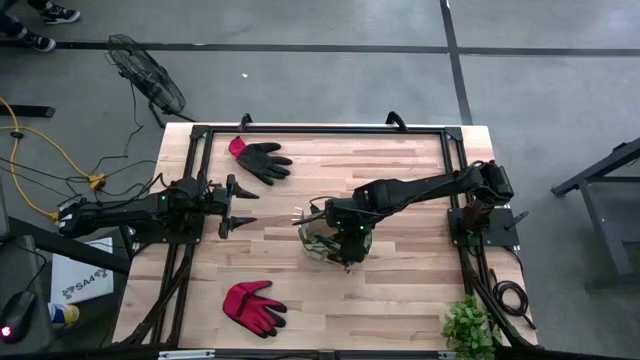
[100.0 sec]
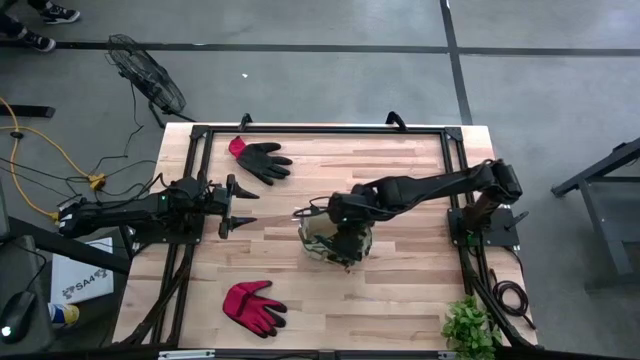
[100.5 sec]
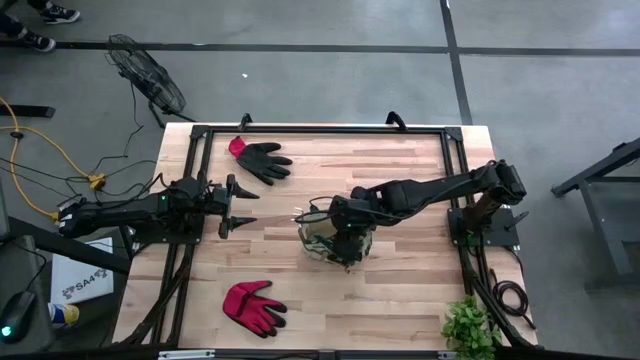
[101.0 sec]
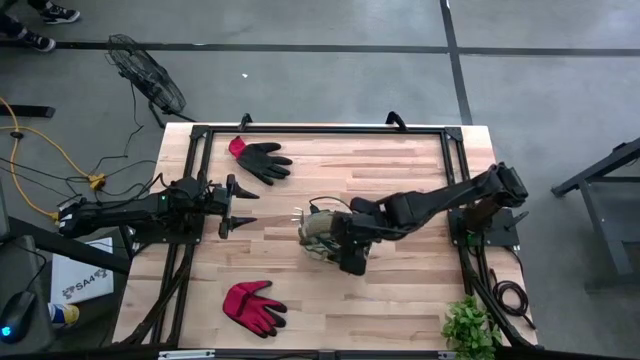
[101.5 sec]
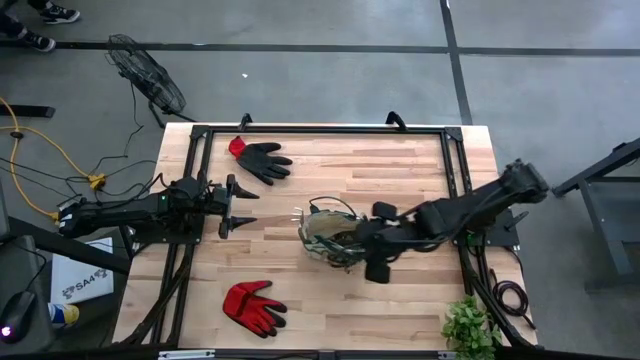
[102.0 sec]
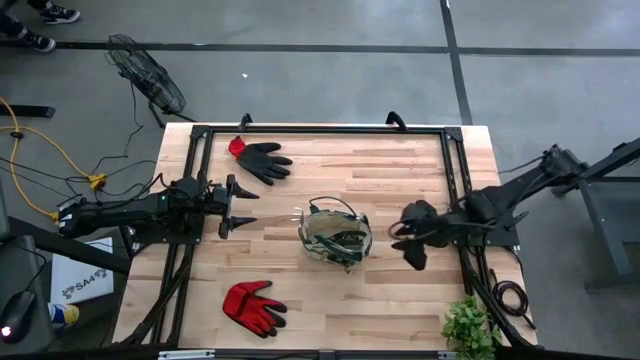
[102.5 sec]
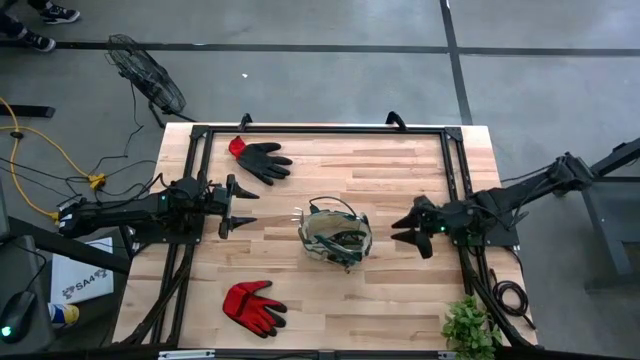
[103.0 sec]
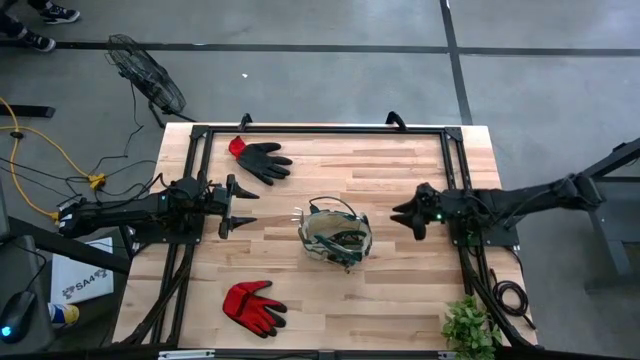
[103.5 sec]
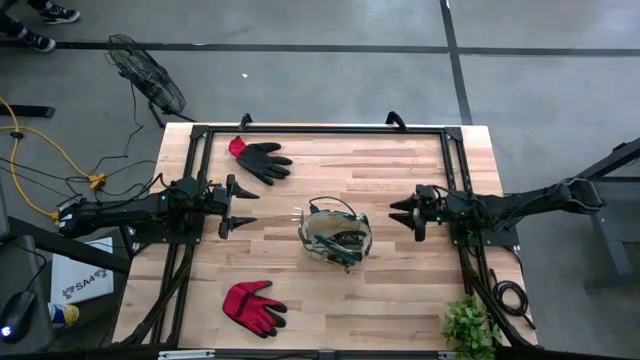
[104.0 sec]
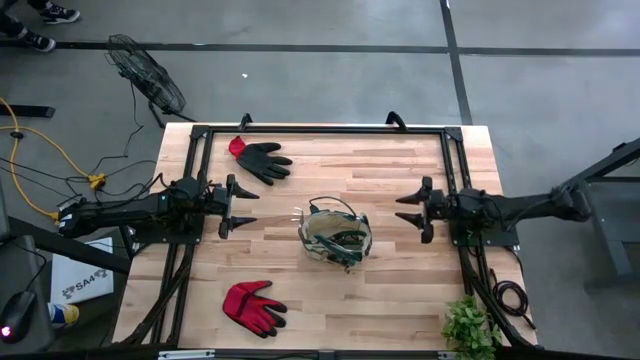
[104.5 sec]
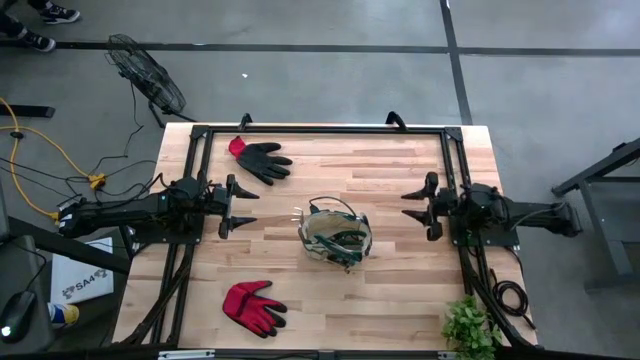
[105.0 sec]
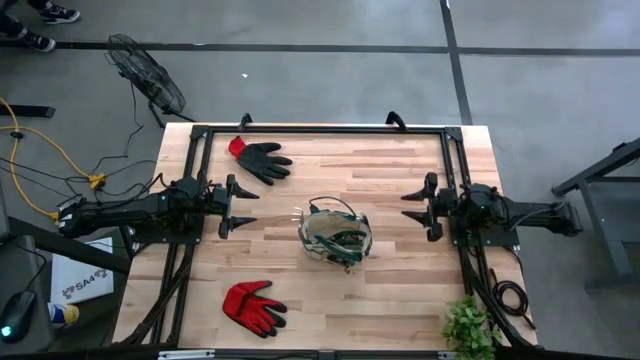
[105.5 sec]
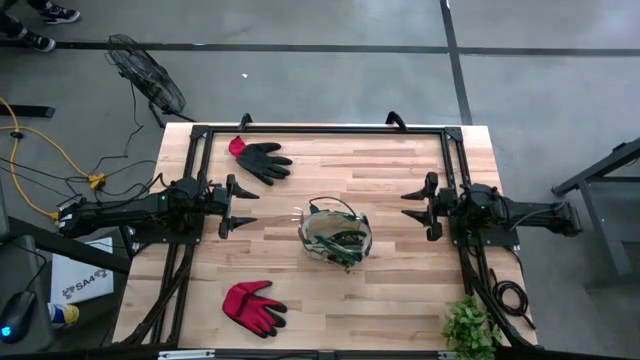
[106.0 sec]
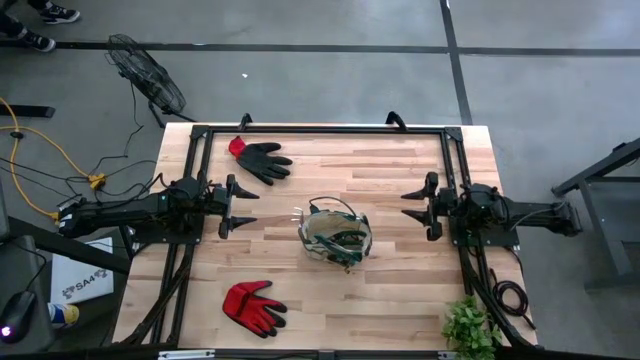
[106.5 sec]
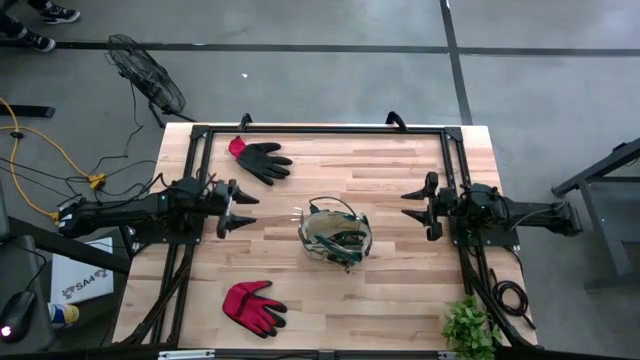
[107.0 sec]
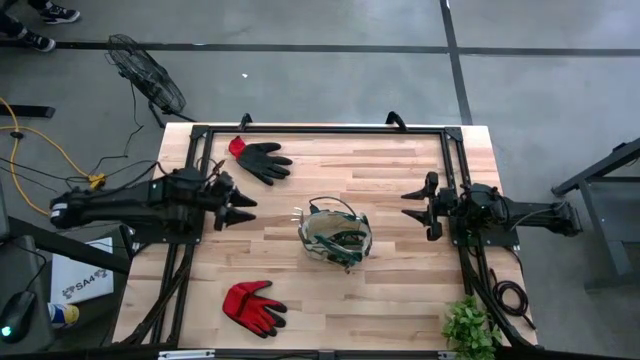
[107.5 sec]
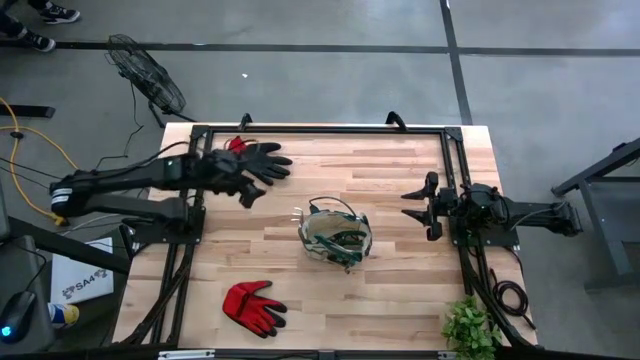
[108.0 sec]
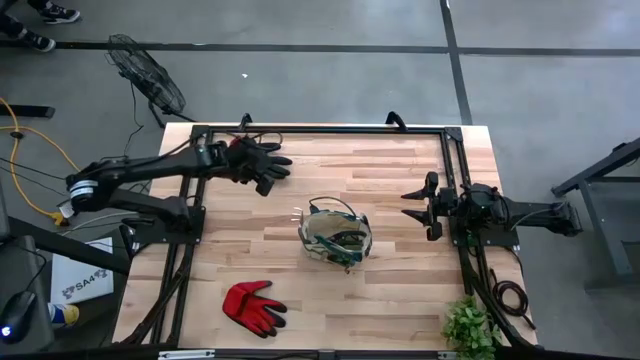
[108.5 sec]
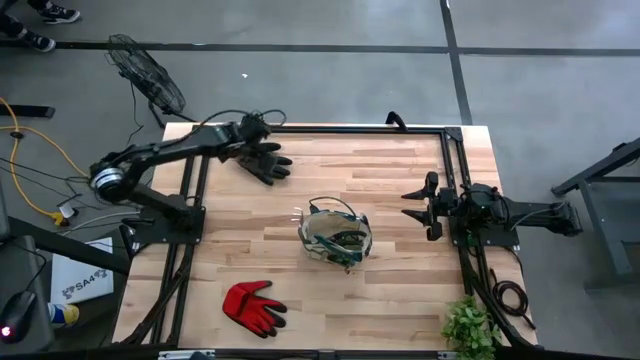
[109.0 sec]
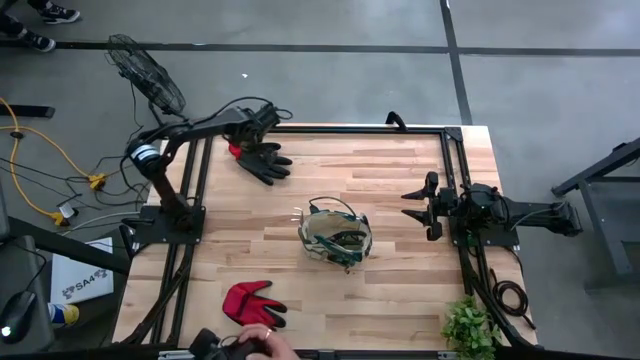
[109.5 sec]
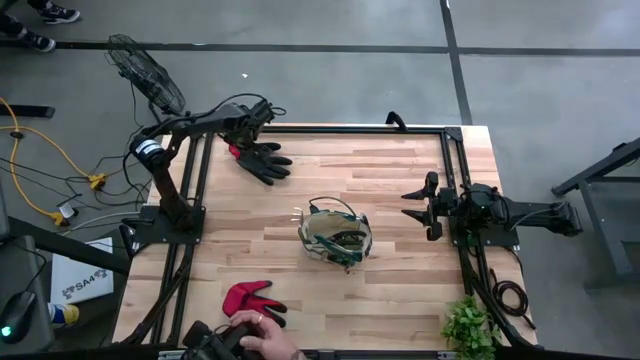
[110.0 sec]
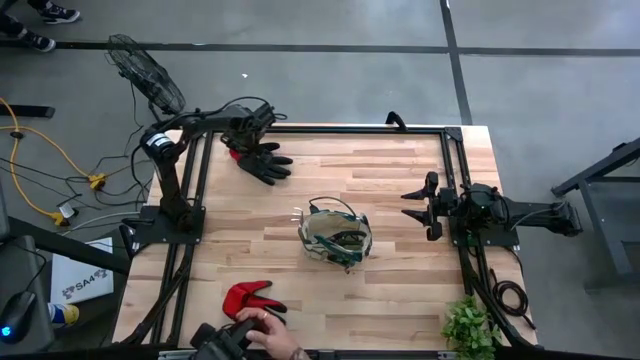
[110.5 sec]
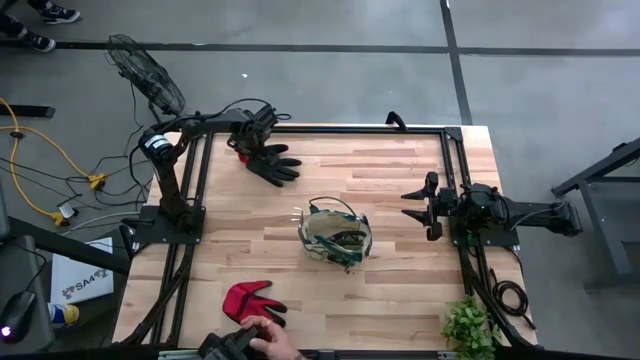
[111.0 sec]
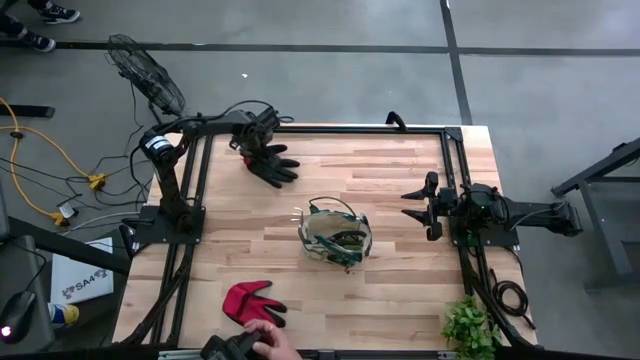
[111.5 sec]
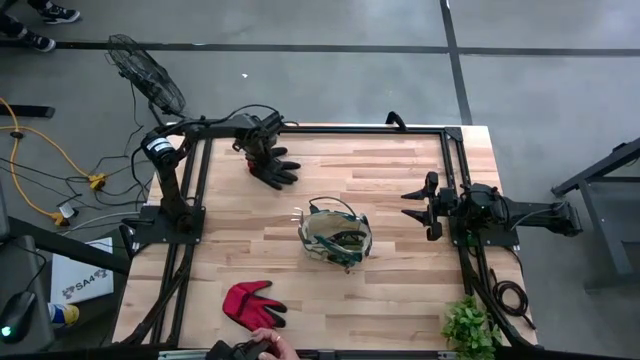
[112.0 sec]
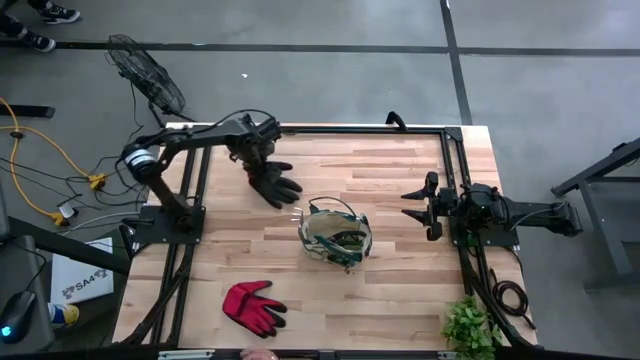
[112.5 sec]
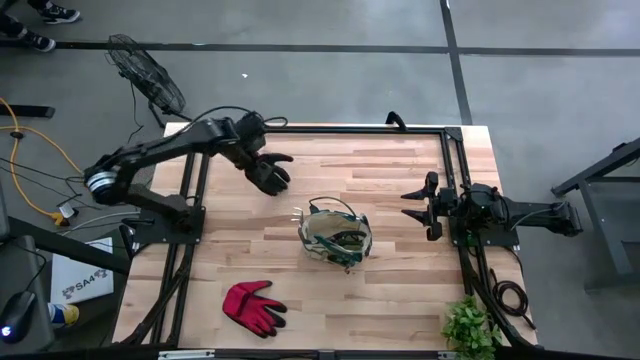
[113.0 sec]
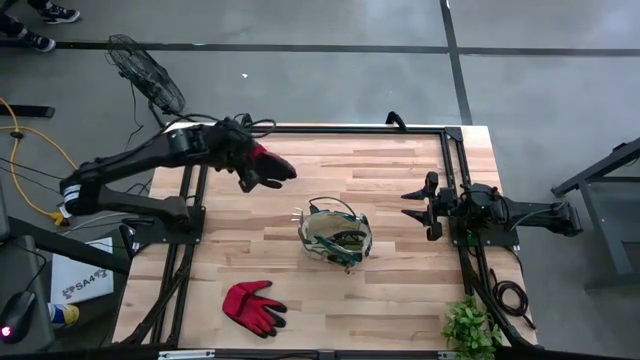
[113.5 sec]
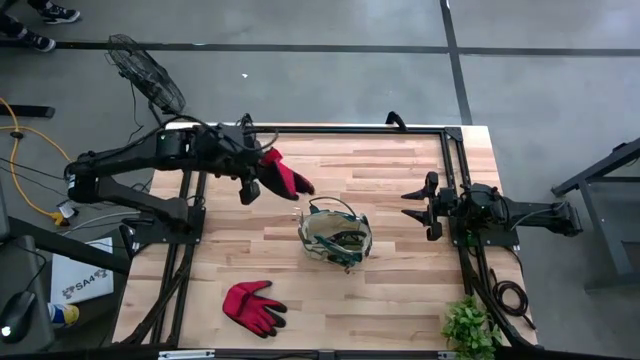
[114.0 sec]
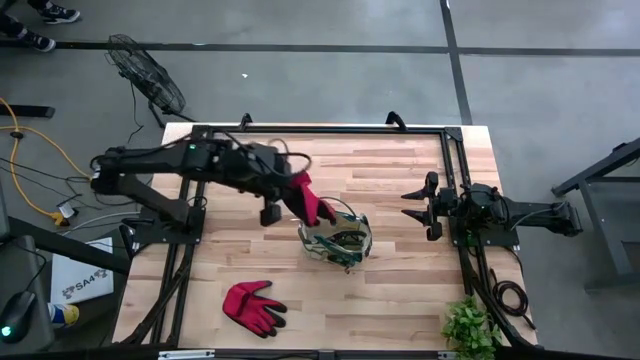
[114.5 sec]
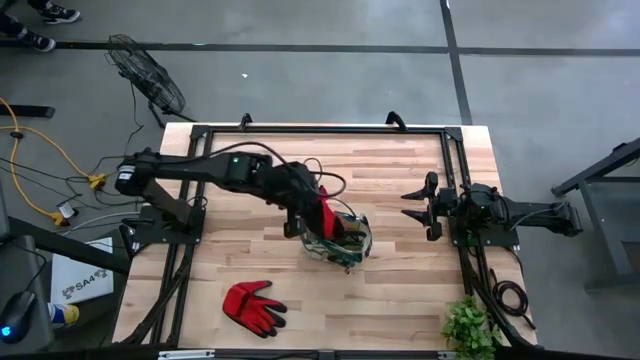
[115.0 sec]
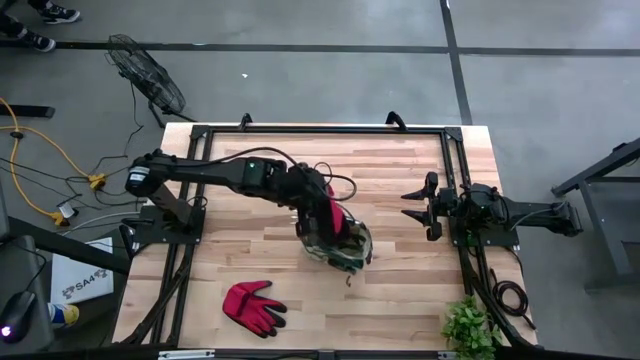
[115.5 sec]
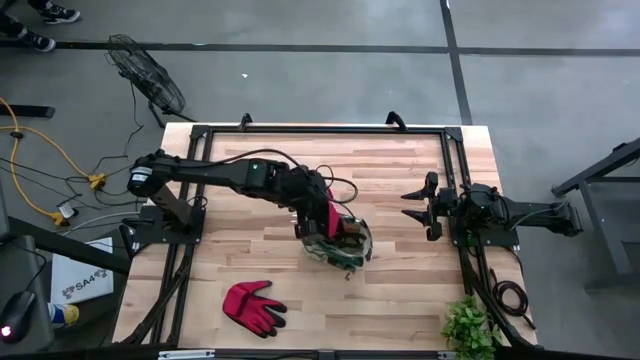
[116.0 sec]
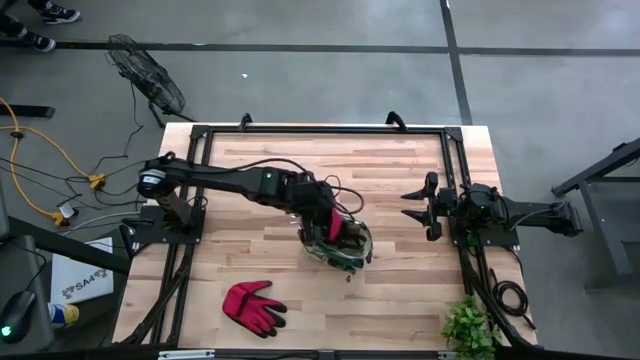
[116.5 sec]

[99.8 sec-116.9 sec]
Task: Pick & Place Garden tools in Gardening bag
Put the red glove into the gardening bag

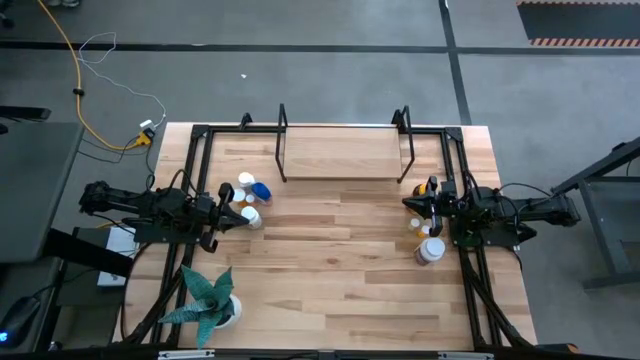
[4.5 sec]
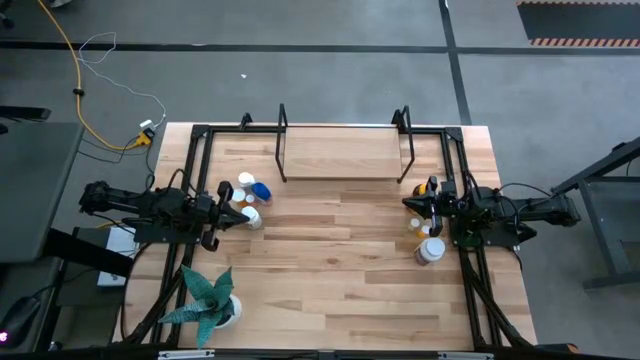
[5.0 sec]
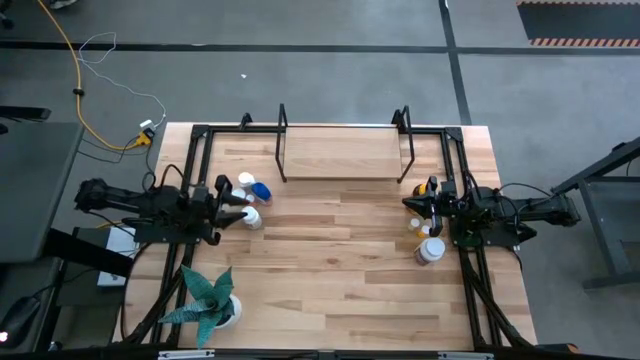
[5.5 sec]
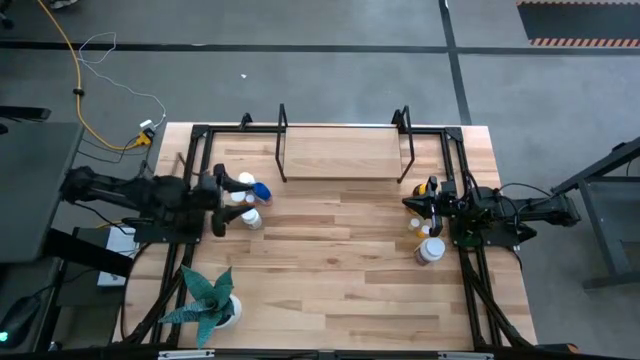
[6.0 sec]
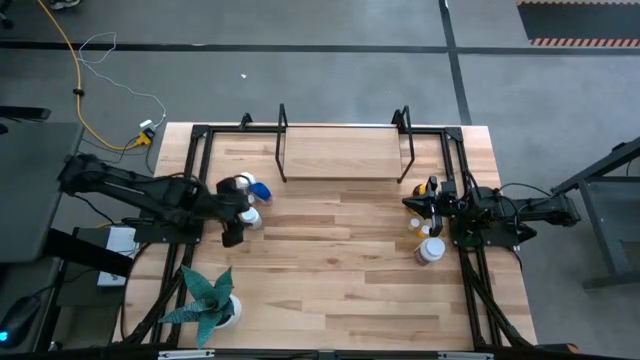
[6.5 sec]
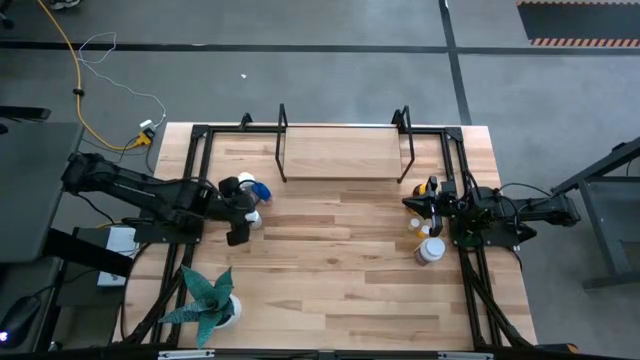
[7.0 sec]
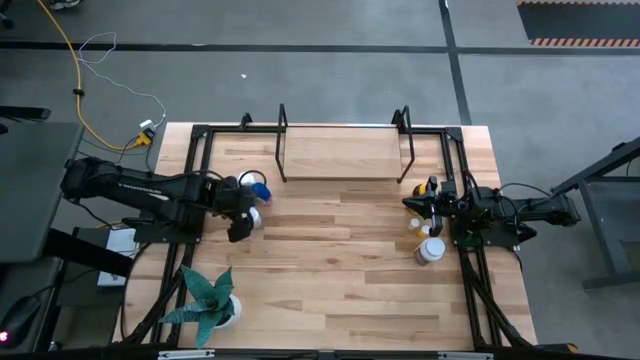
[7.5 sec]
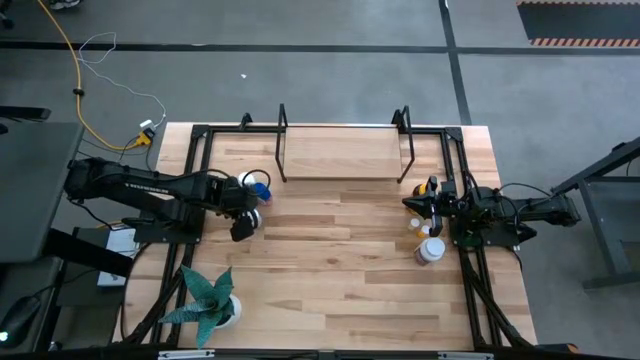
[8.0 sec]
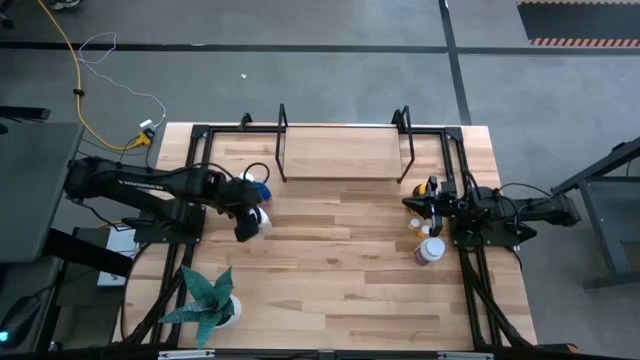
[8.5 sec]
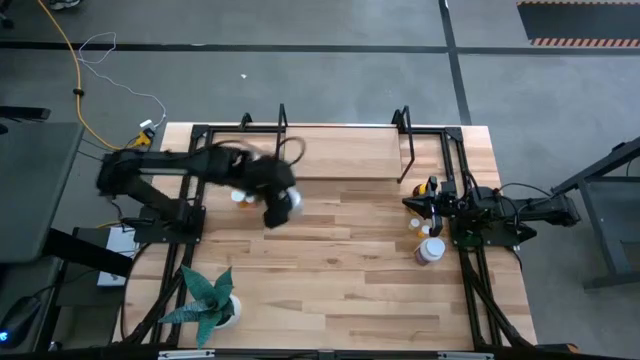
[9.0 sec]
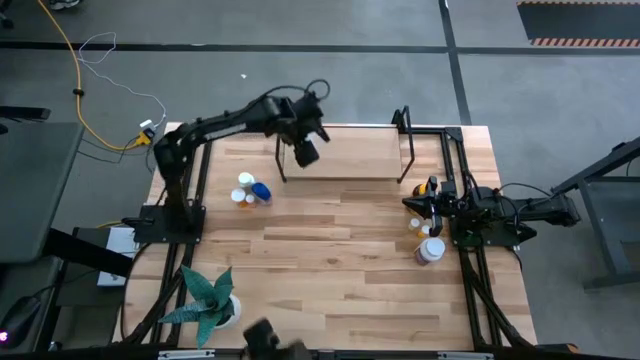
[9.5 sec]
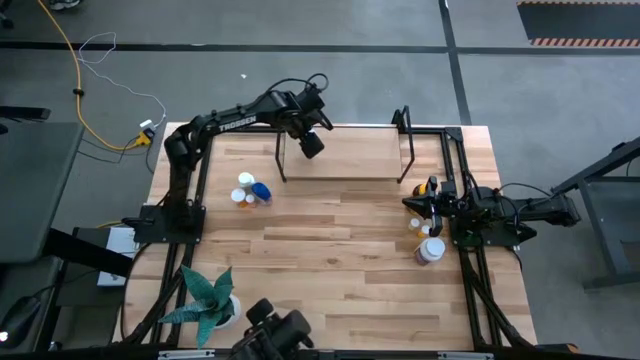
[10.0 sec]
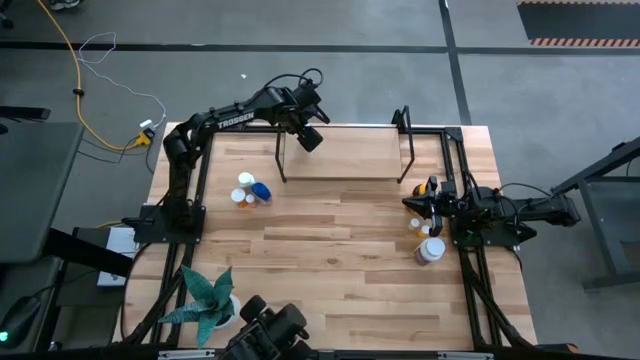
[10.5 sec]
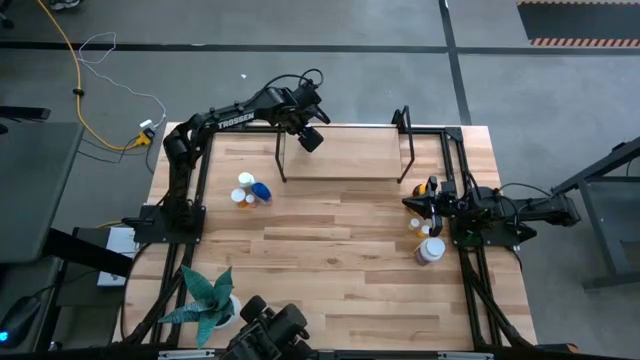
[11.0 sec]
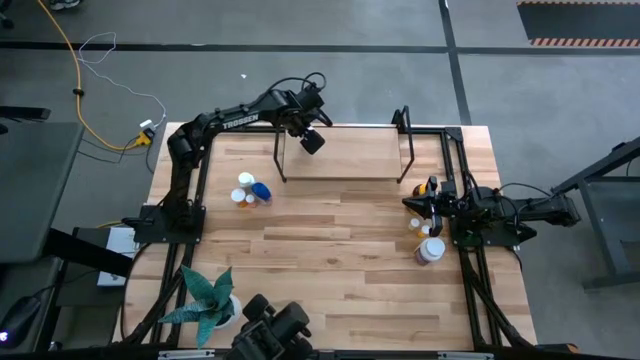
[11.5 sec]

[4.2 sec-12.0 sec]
Task: Pick and place medicine bottles onto shelf by color
Put the large white pill bottle on the shelf
